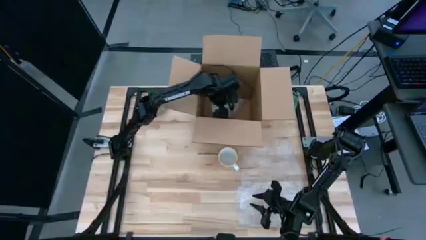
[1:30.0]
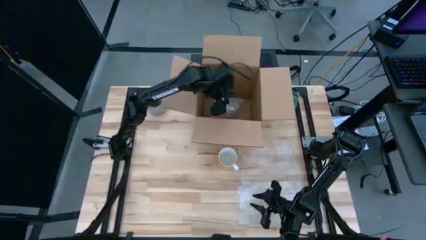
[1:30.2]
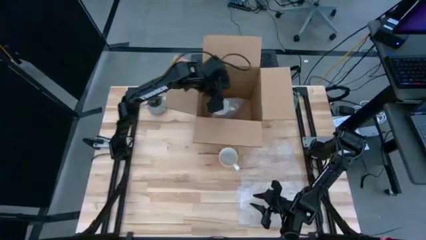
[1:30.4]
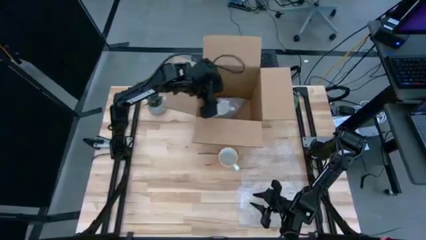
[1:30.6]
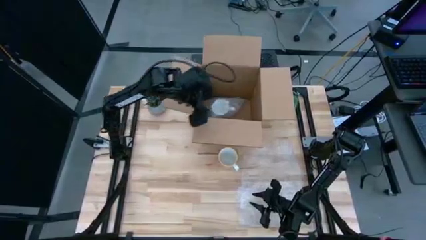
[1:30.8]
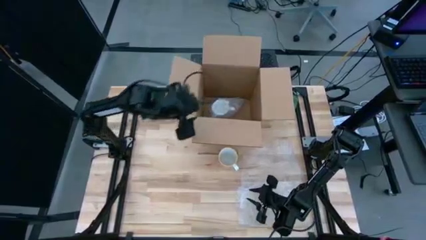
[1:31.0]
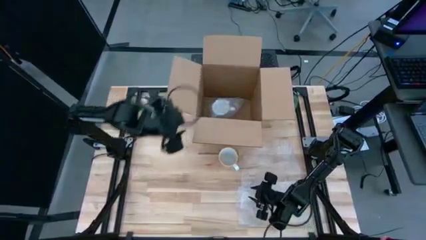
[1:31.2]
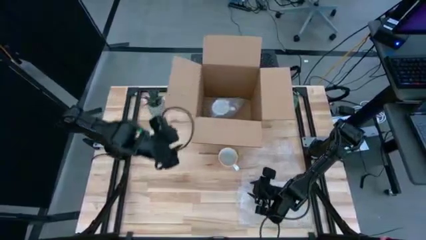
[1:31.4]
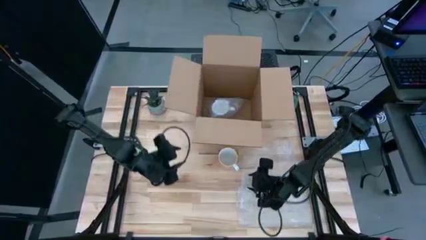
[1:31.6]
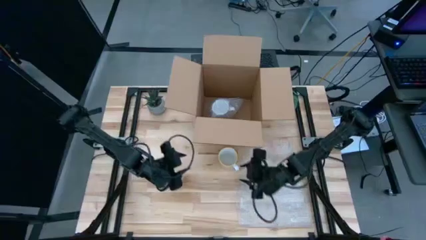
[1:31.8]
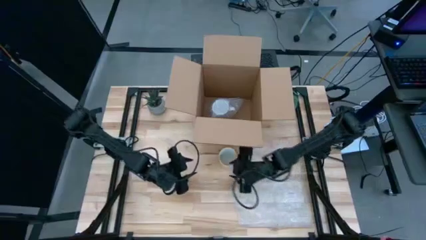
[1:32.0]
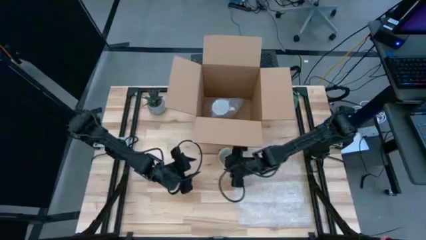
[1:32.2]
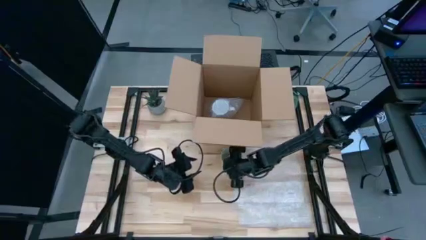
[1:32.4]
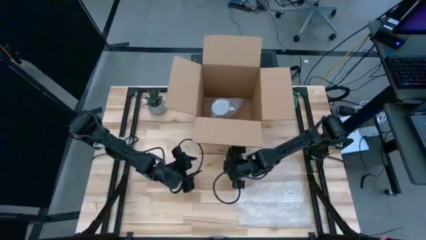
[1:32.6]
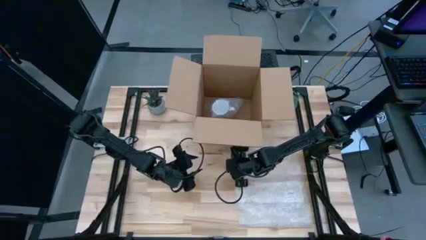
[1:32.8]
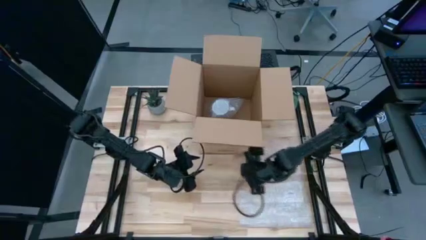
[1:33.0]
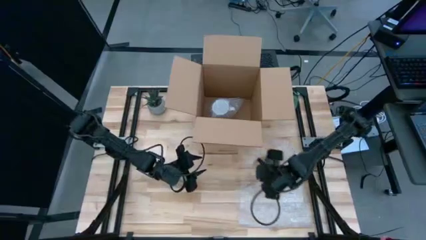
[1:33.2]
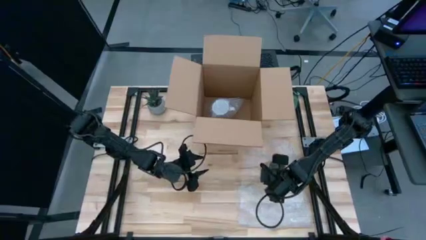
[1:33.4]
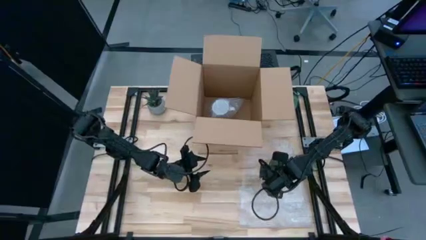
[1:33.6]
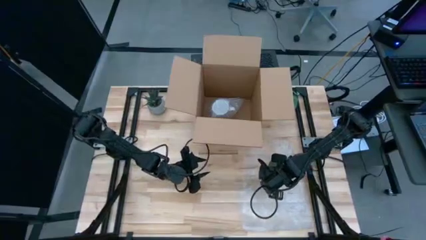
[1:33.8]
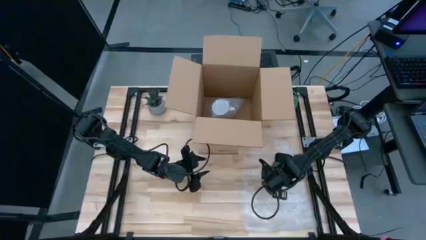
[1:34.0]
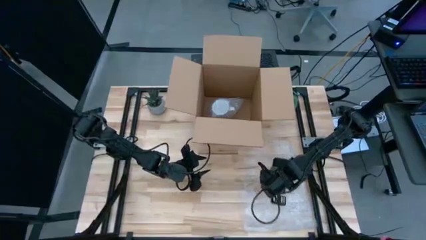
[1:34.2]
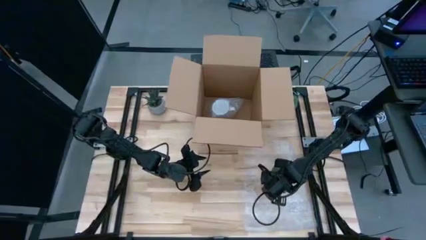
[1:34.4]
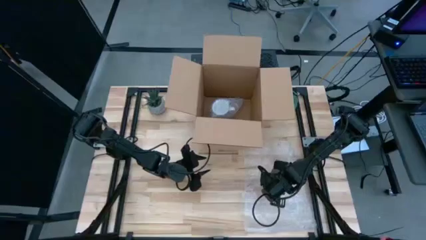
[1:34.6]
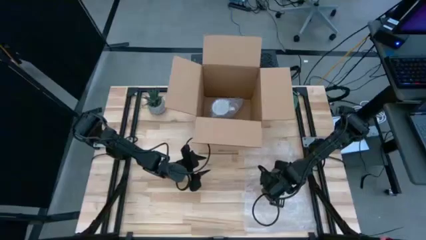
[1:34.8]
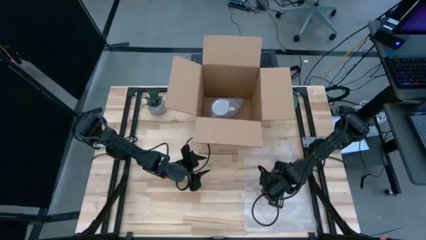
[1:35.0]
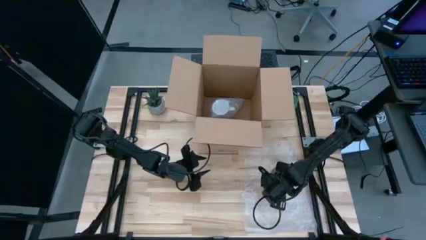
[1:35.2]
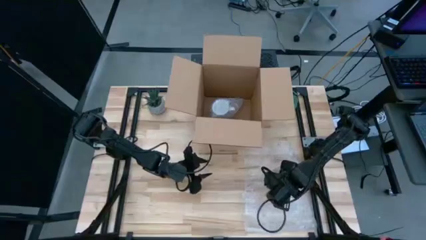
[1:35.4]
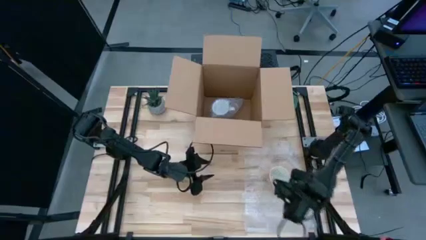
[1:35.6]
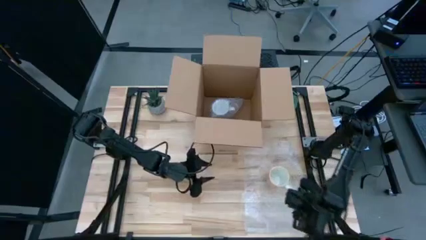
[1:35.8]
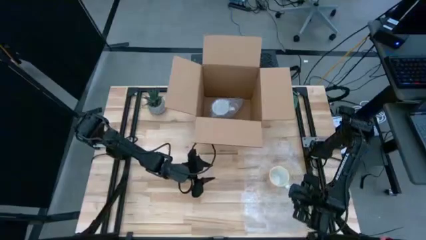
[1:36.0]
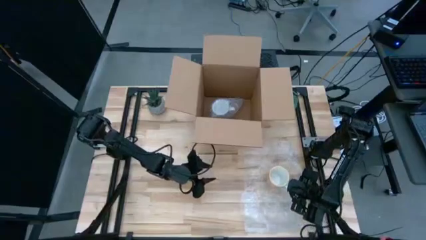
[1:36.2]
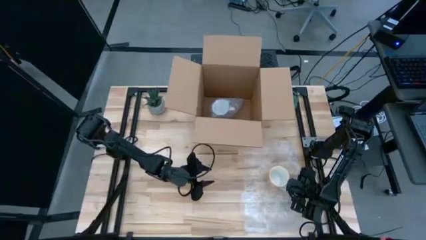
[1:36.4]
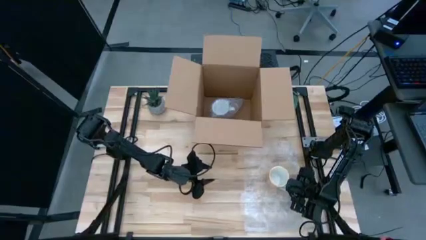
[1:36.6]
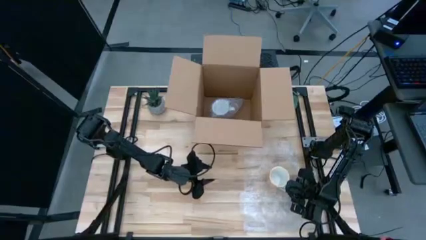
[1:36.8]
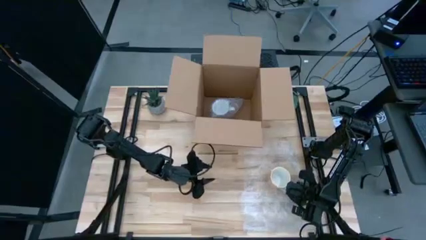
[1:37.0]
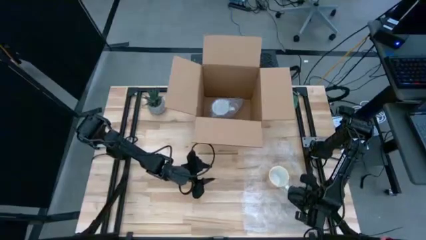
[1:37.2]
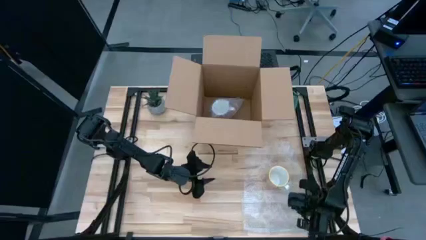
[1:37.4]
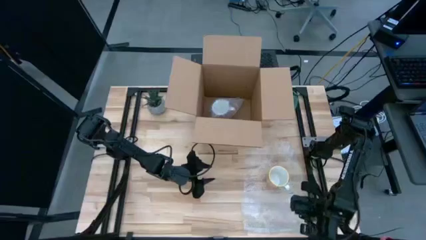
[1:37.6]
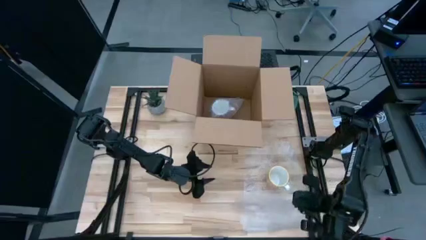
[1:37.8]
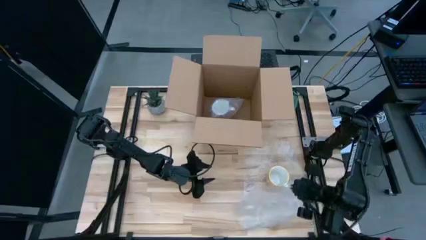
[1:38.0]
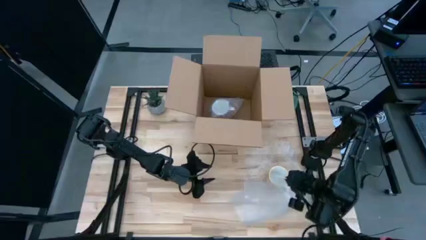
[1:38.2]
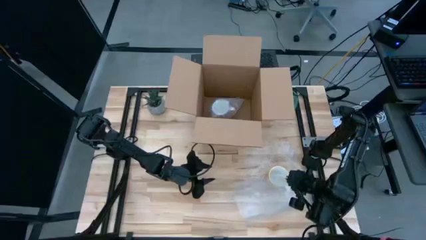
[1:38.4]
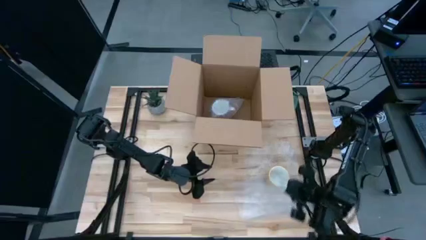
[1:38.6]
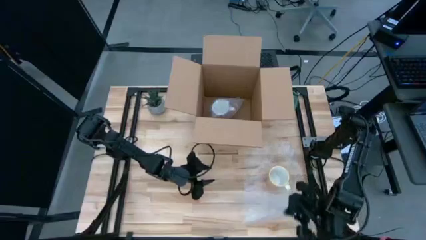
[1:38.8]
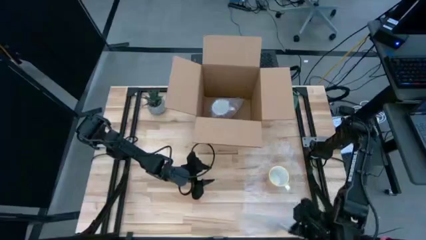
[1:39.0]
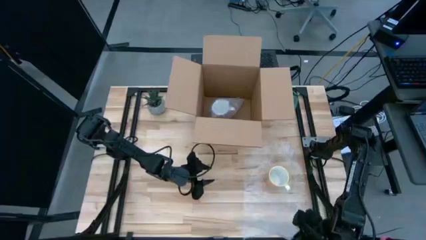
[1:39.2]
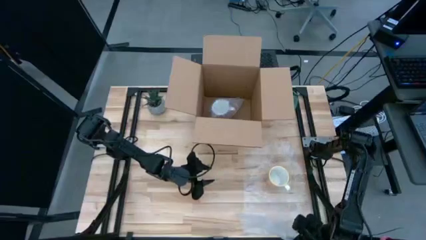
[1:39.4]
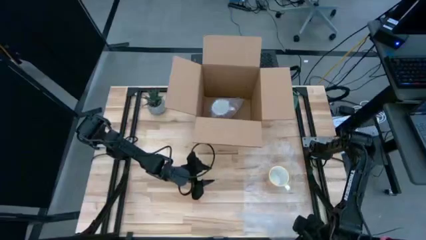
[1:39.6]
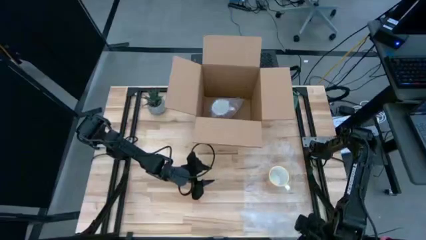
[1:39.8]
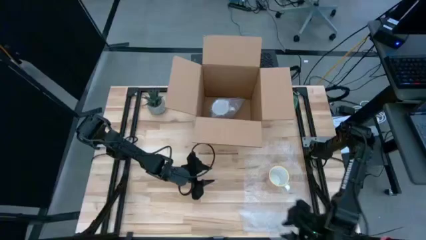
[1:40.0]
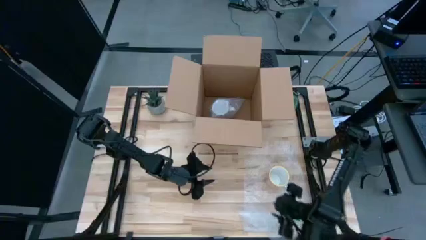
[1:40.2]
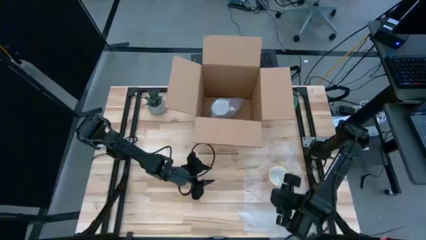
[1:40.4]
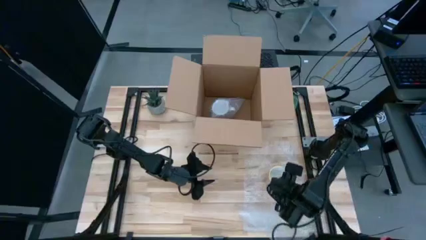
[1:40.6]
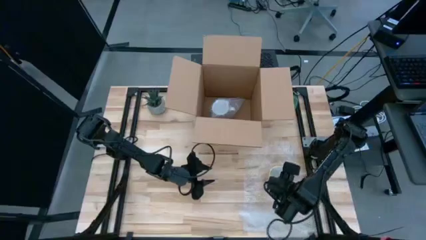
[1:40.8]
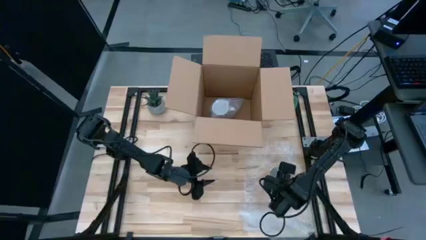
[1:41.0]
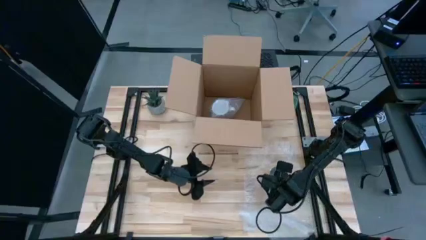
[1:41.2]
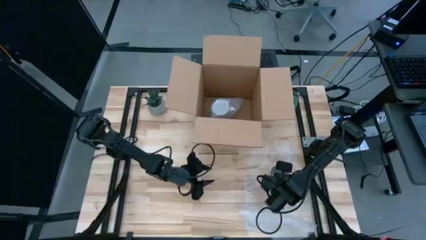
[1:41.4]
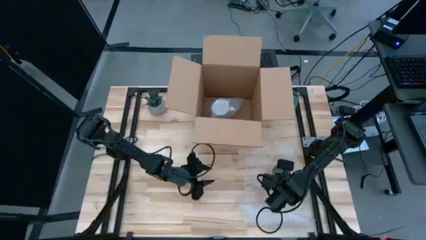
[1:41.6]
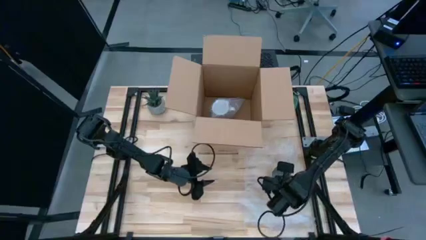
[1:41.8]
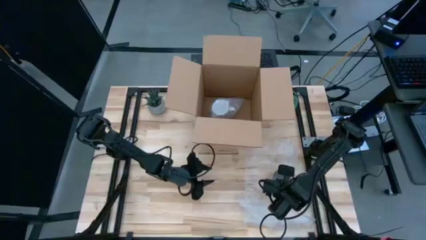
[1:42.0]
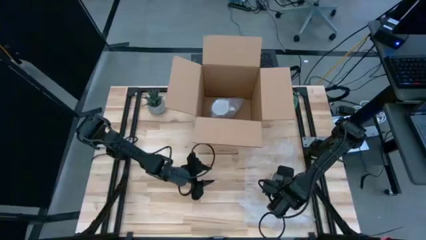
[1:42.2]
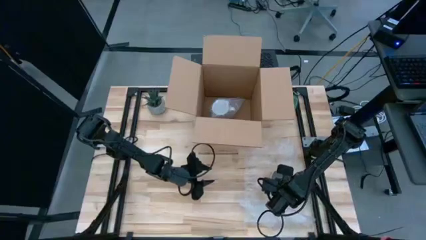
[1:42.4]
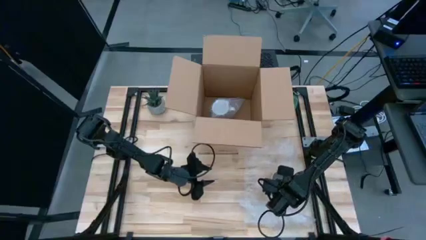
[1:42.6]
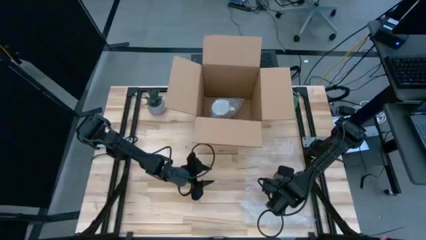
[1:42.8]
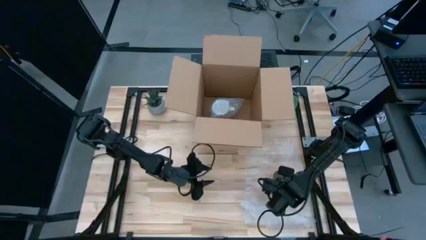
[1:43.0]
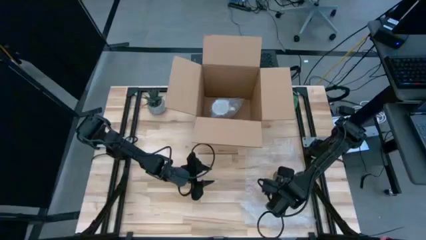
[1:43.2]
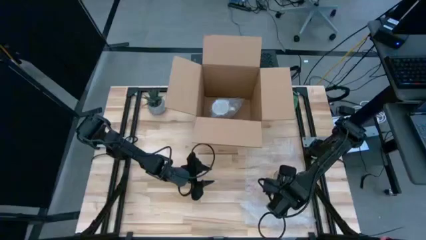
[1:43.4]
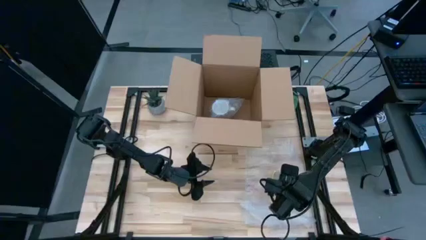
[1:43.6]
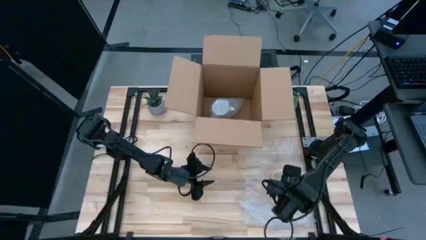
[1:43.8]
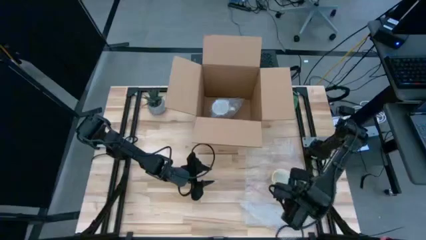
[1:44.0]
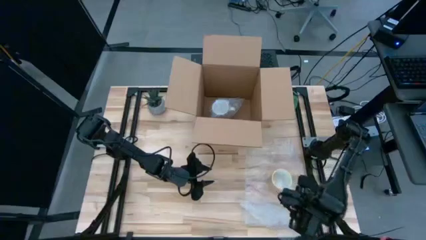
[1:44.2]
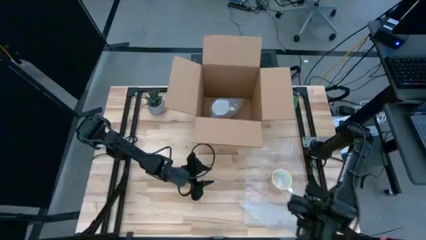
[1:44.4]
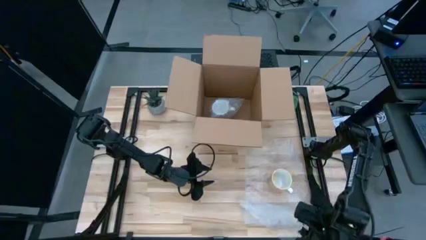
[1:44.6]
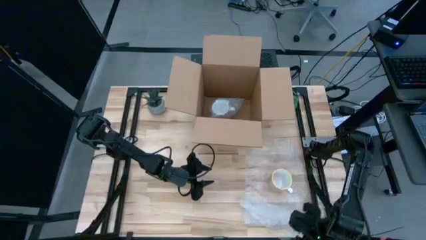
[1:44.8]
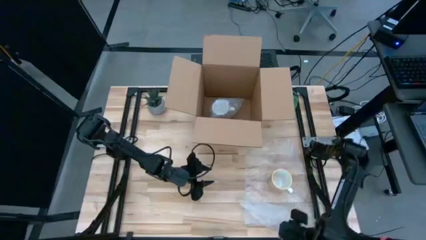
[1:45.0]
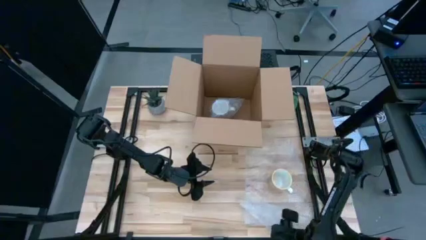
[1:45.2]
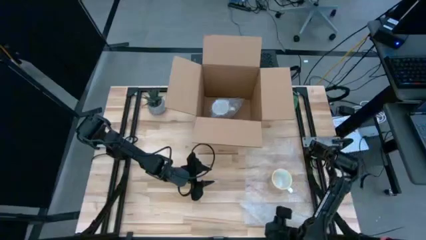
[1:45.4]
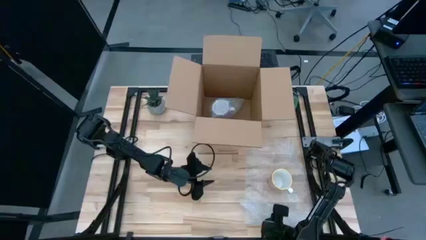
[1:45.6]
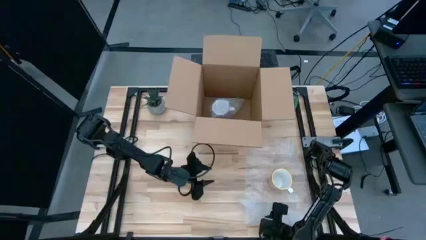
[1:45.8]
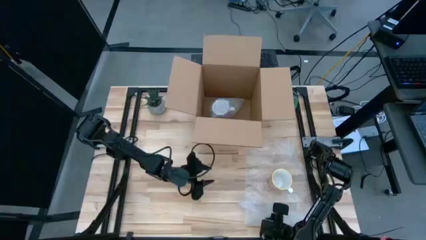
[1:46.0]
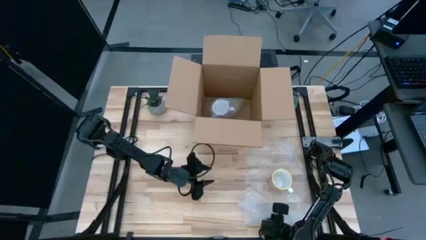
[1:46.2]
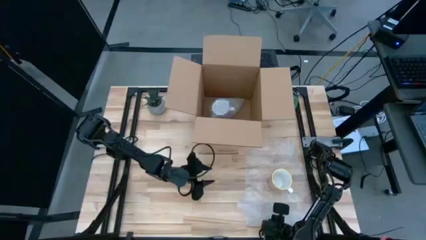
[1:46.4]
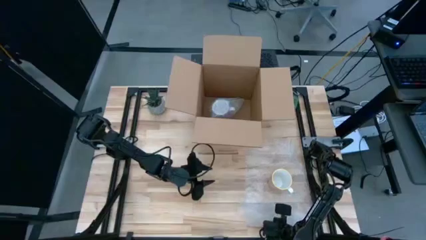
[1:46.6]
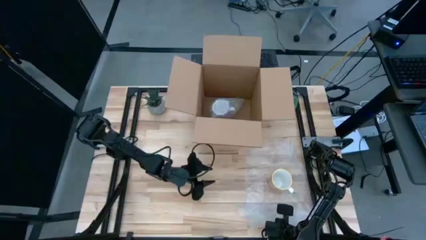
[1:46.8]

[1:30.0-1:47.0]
Task: wrap mug
Wrap the orange mug with the bubble wrap
